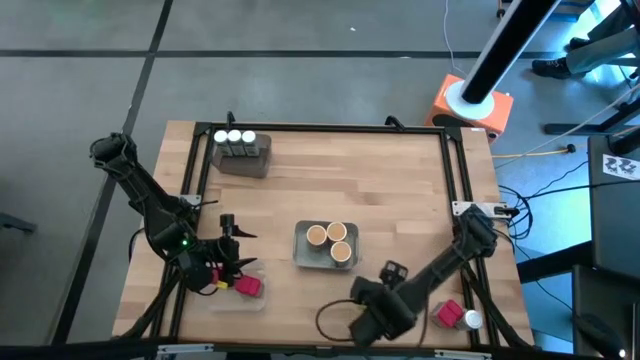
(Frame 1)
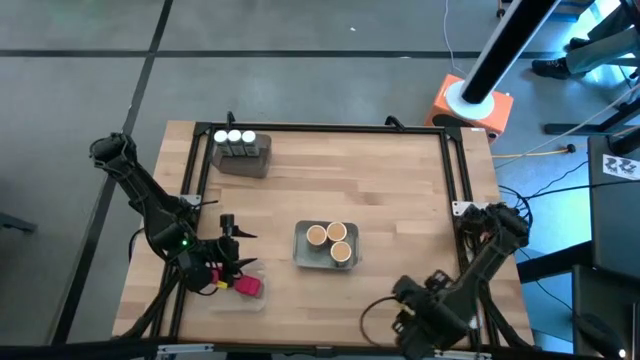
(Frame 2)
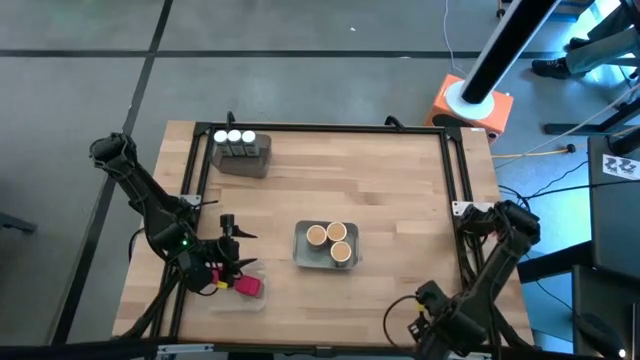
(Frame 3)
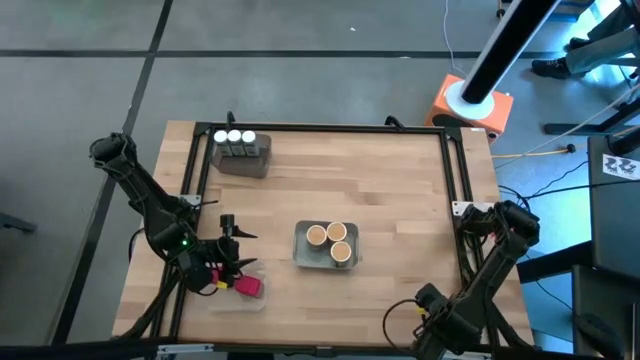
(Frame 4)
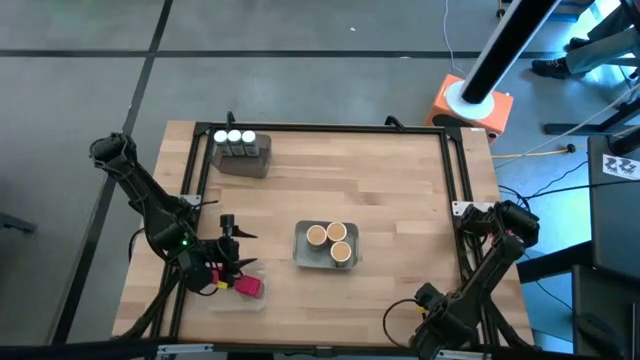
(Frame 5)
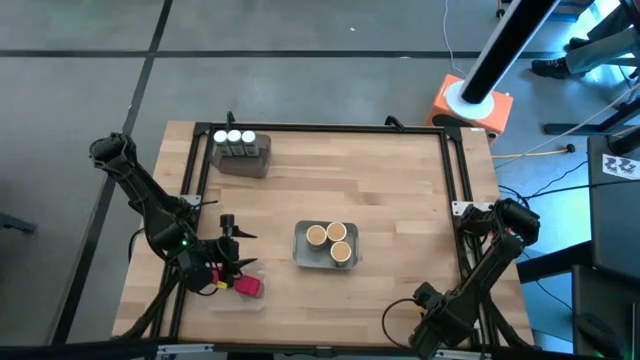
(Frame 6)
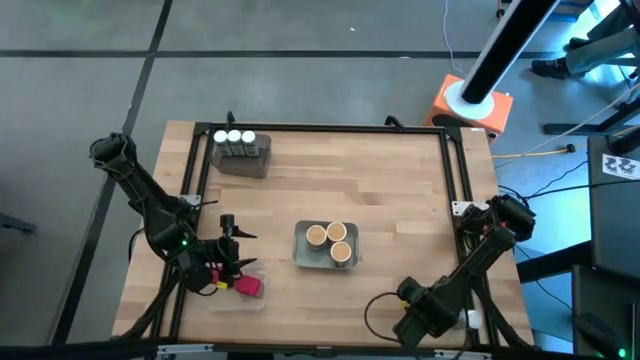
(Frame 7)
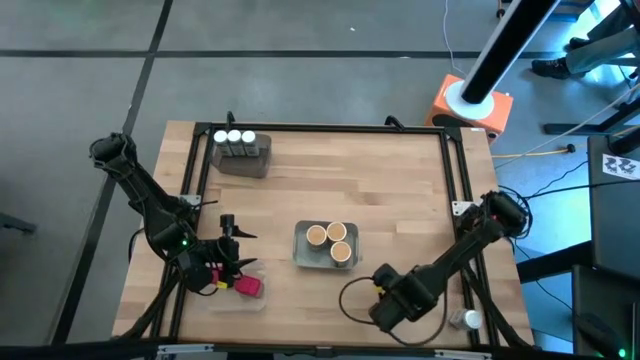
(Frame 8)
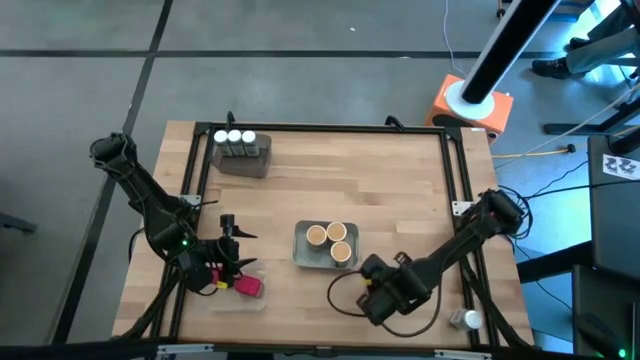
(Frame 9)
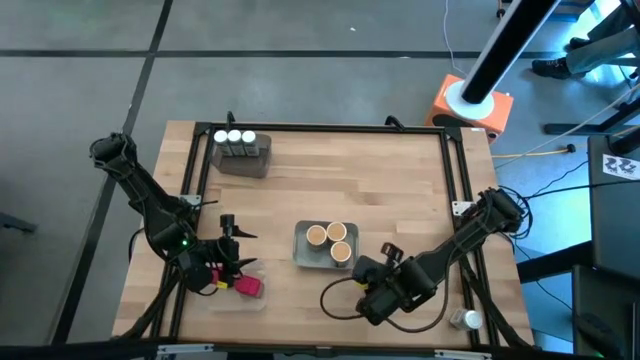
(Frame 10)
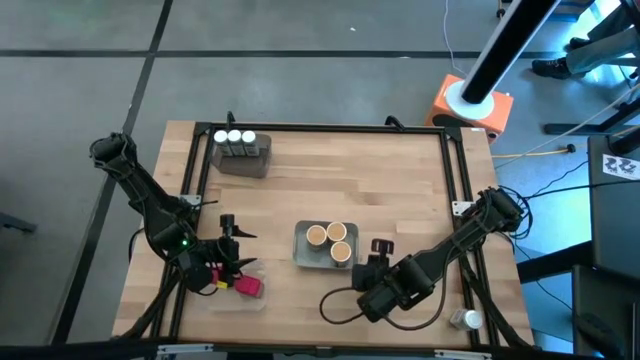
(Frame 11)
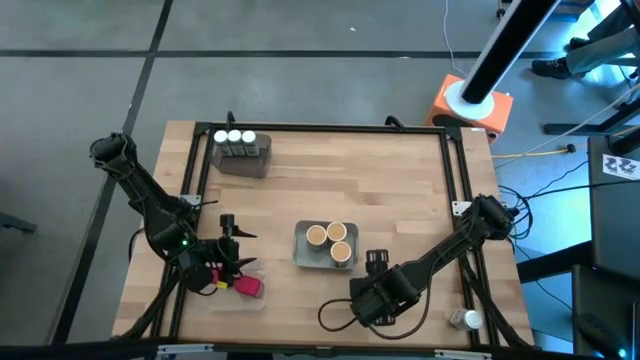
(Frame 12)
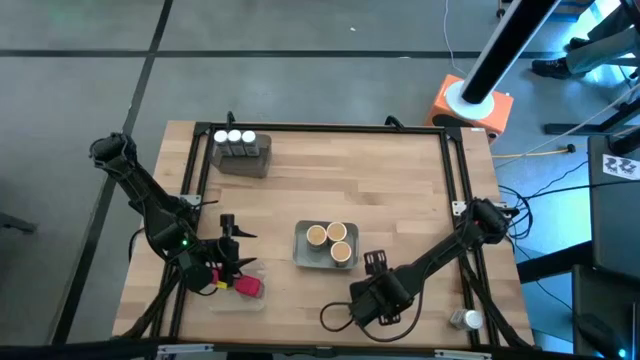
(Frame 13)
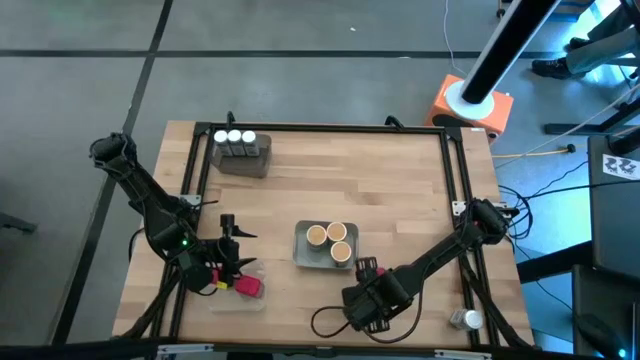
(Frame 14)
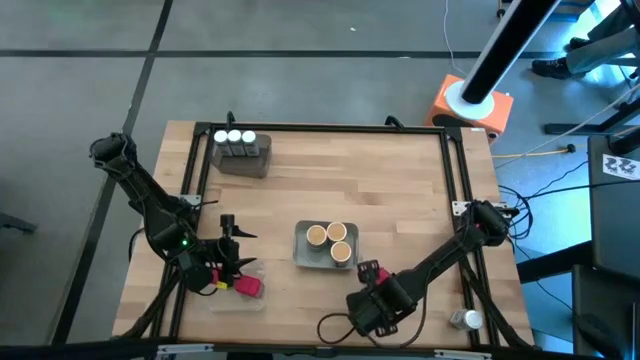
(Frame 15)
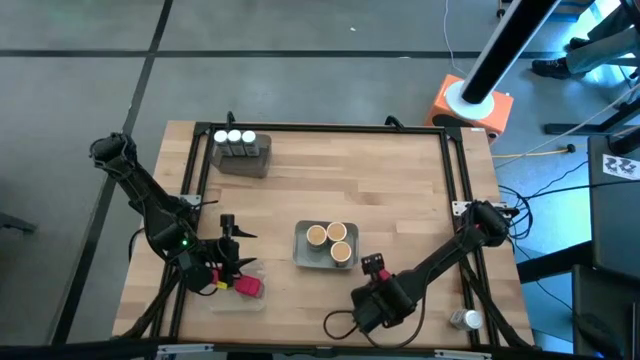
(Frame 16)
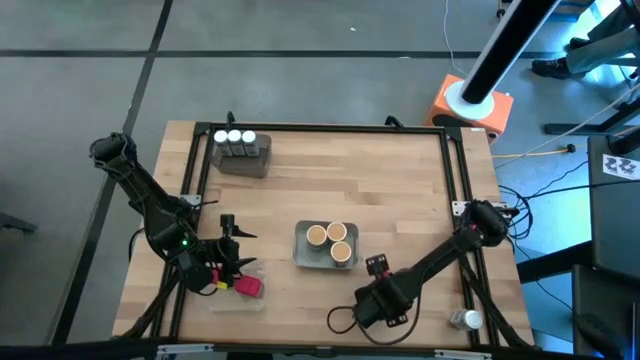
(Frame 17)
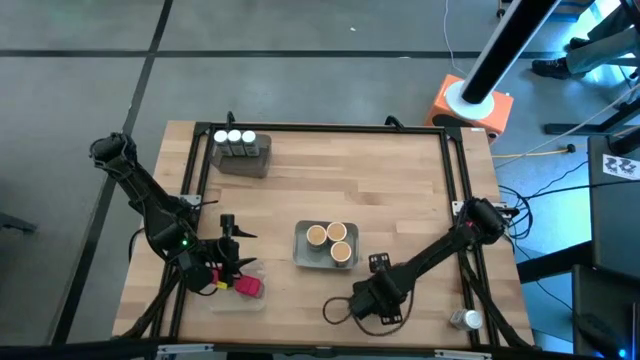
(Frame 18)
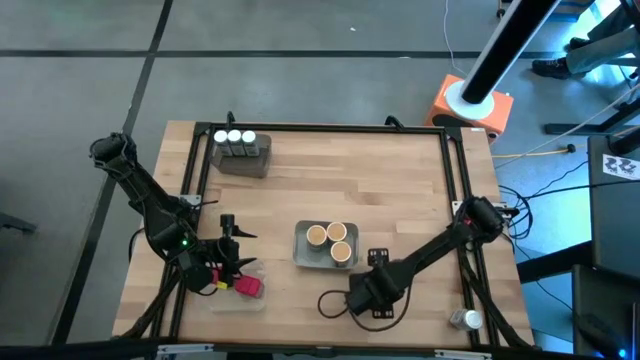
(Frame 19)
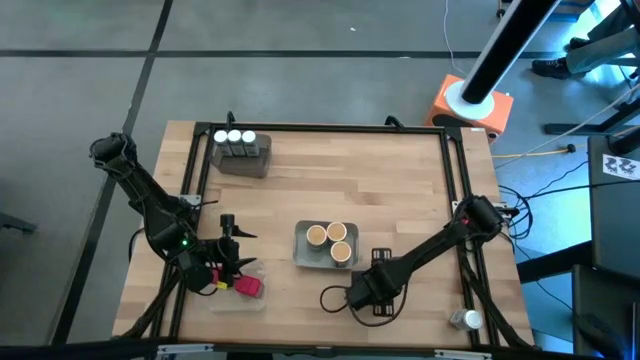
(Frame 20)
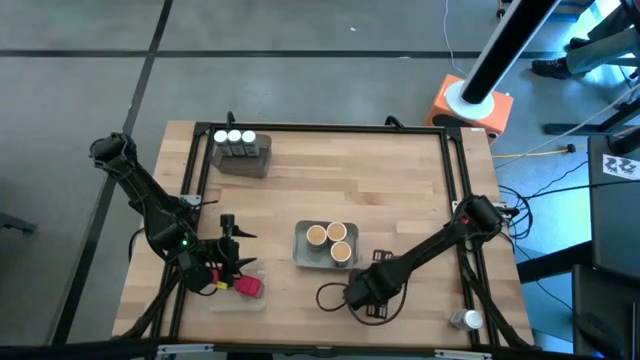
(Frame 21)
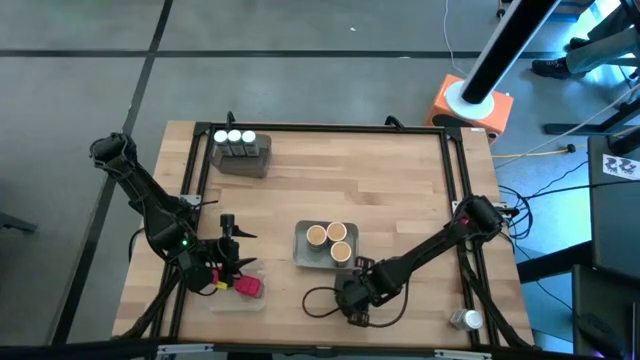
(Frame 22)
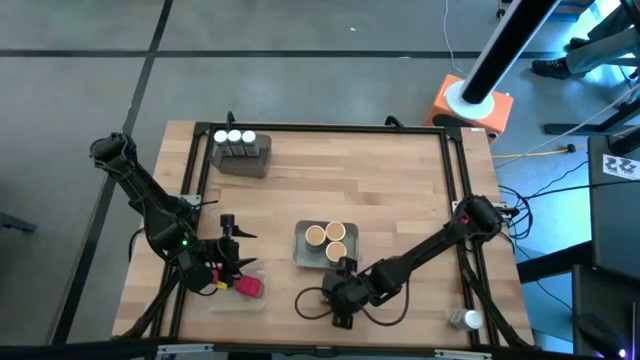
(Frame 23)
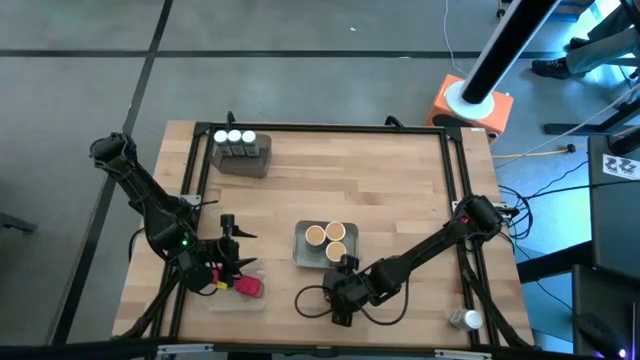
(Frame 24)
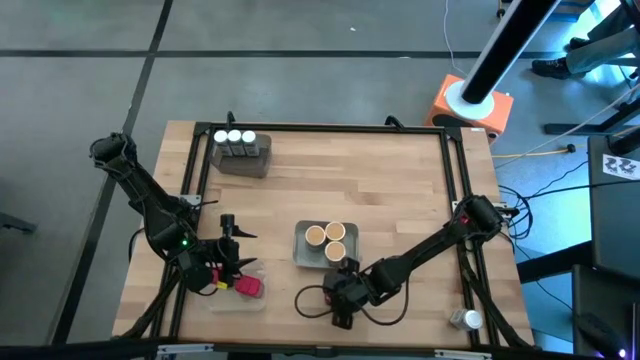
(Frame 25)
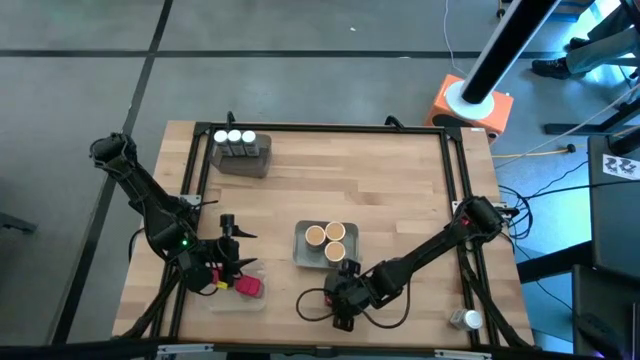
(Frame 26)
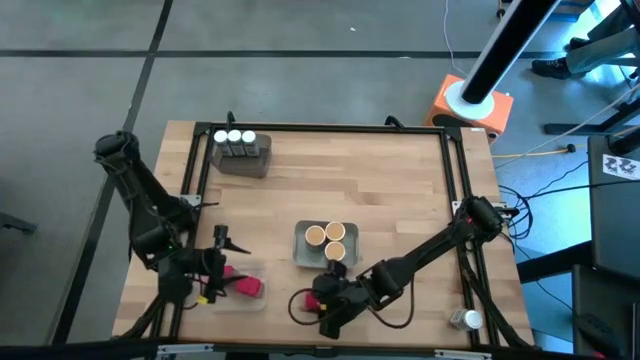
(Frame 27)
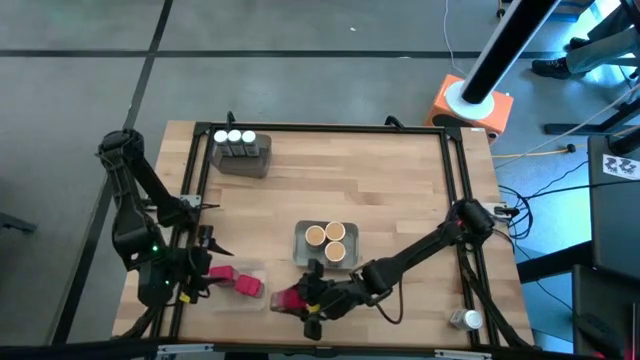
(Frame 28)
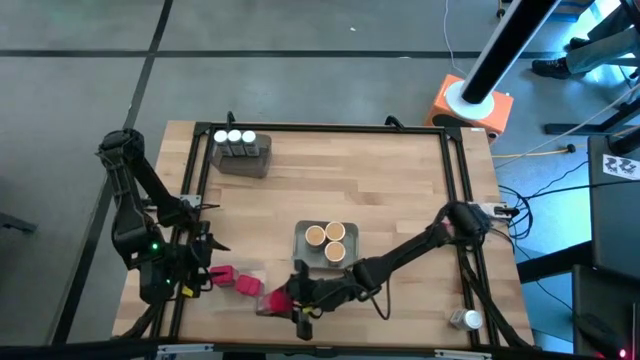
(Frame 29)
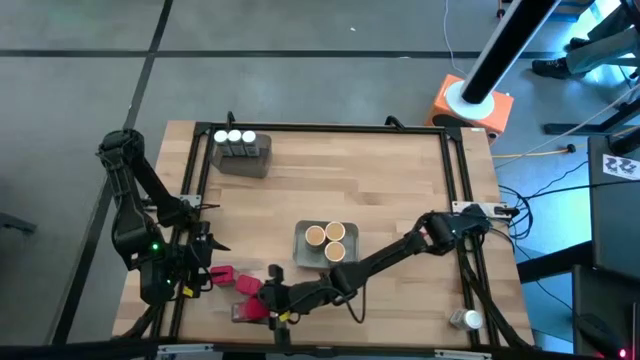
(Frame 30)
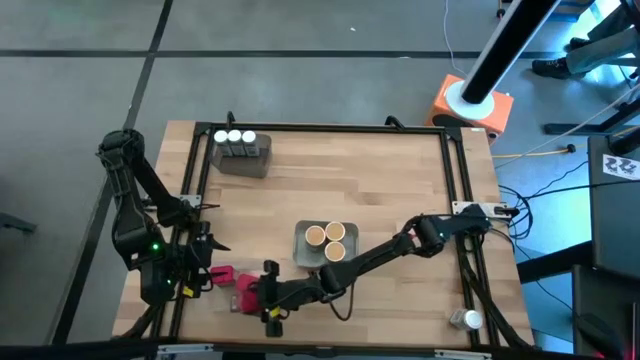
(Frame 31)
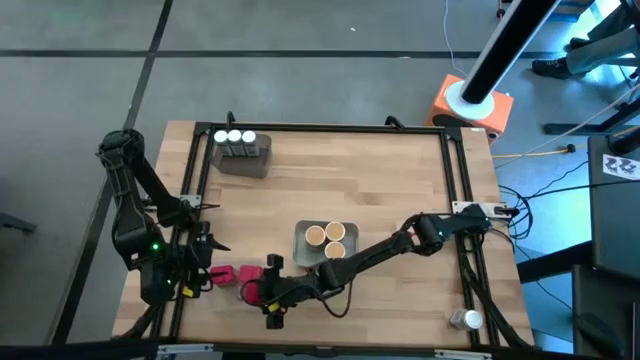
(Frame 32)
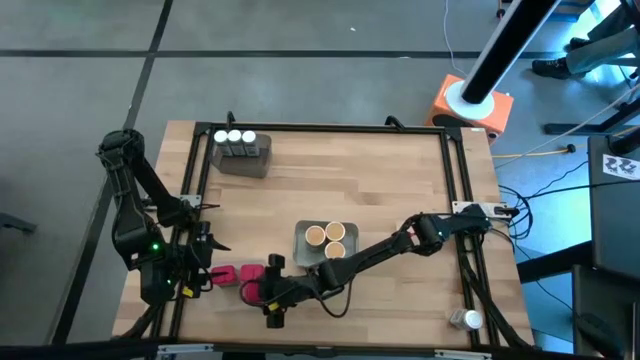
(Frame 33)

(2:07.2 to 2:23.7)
Task: Sort spices by type
Put the red seasoning can into the white bin

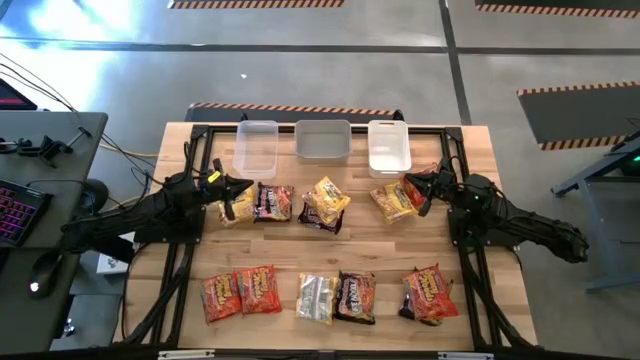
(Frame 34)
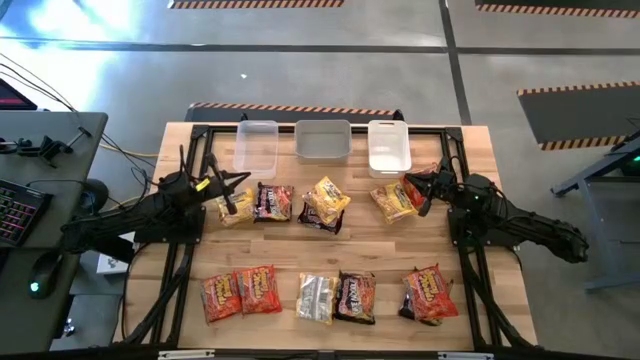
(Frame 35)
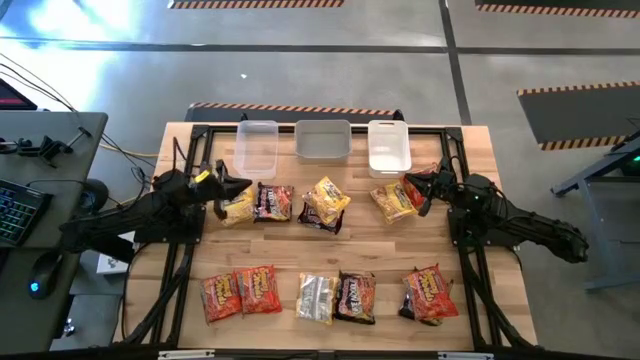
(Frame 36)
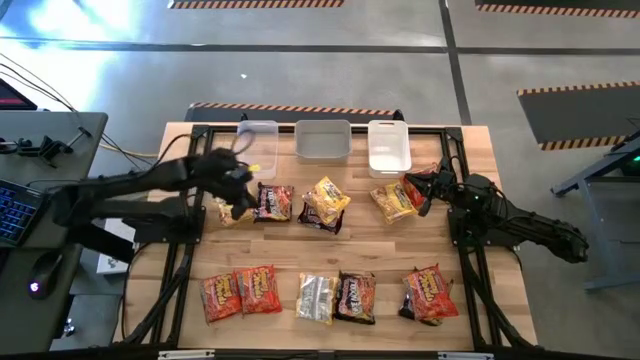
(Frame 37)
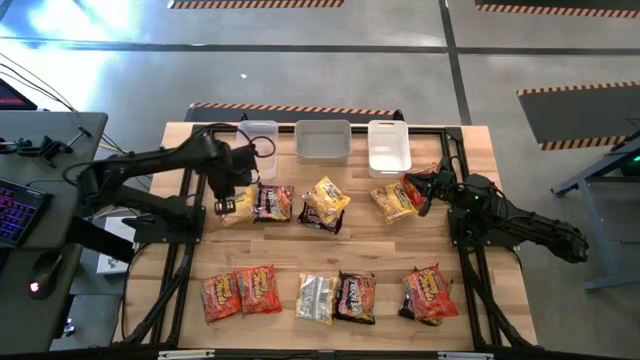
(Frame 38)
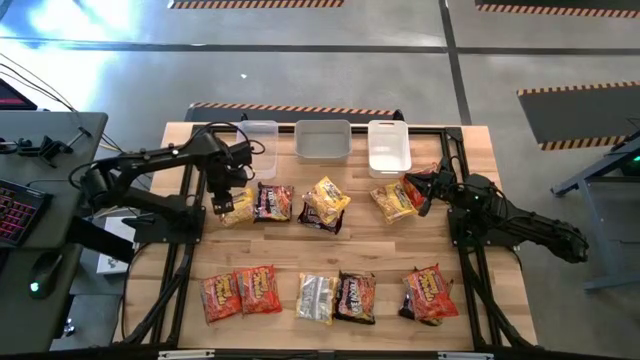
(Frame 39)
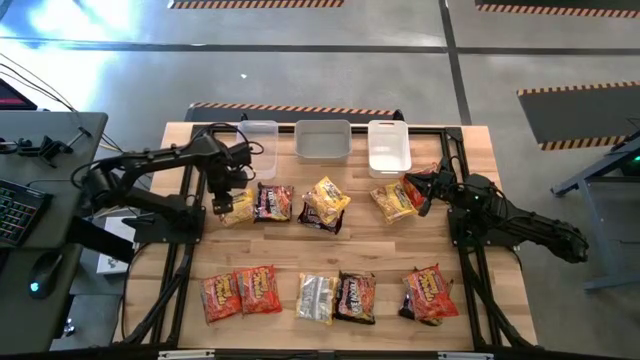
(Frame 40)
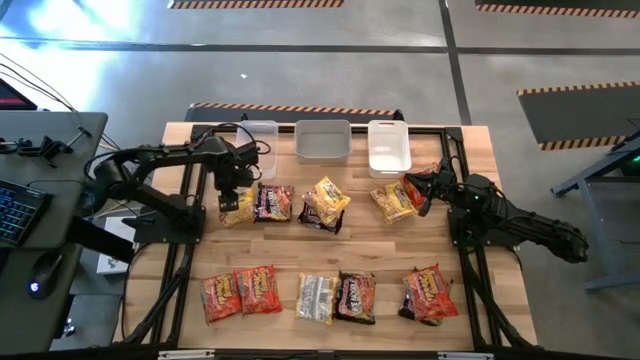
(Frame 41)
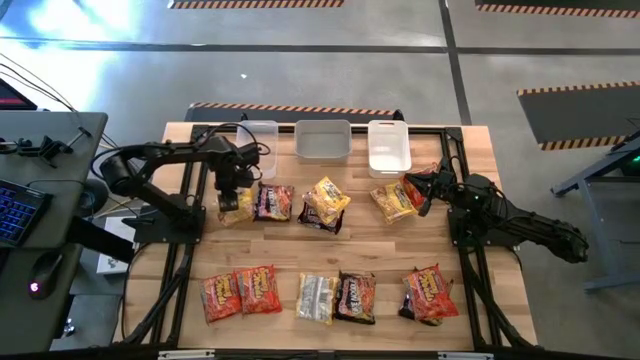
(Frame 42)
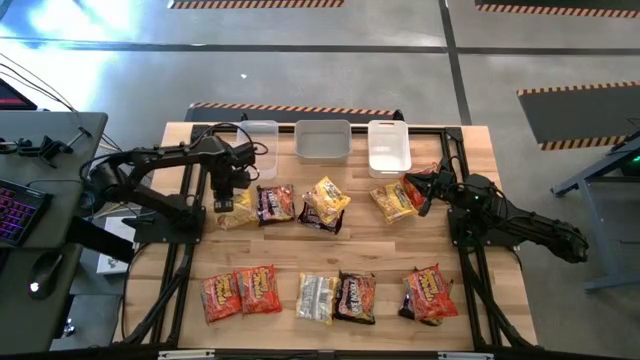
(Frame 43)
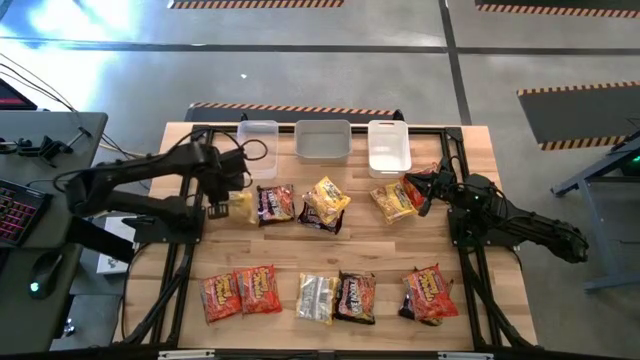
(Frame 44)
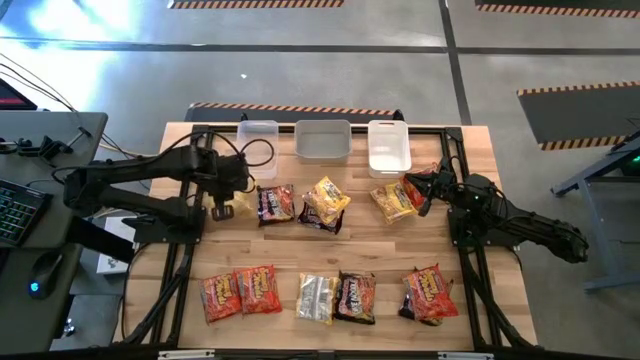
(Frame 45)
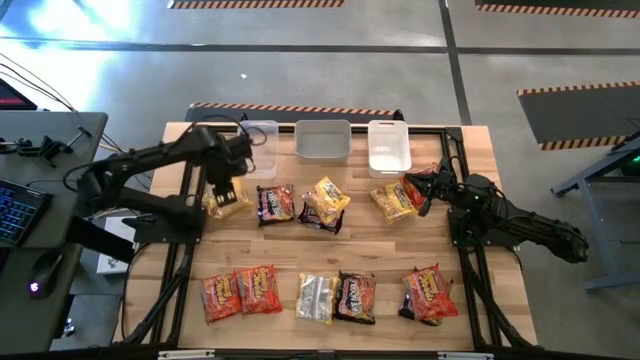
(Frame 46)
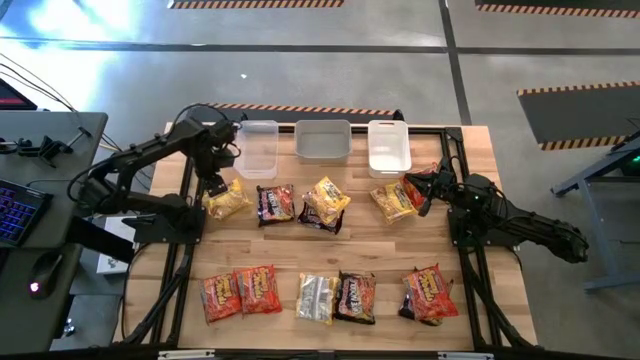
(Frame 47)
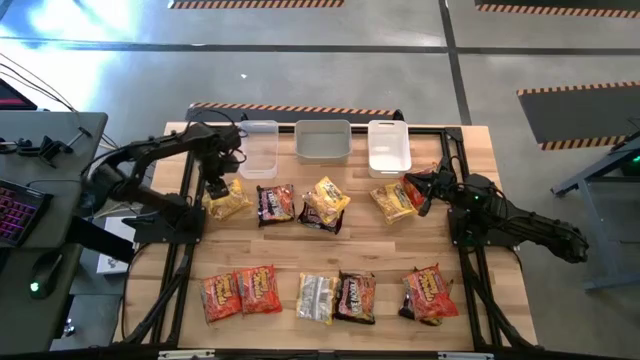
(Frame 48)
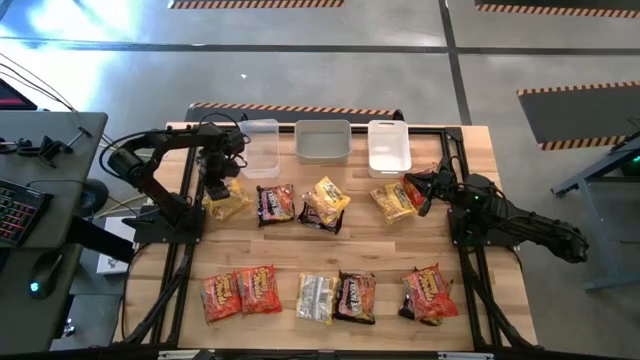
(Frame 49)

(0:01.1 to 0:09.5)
Task: Sort Maruchan noodles
Put the yellow noodle pack into the transparent bin
